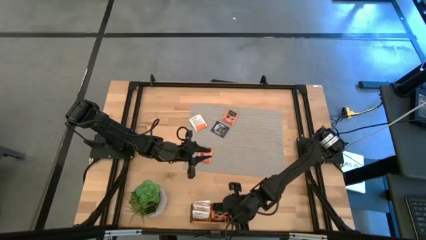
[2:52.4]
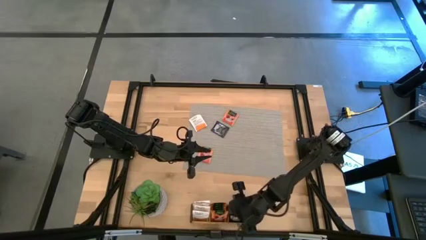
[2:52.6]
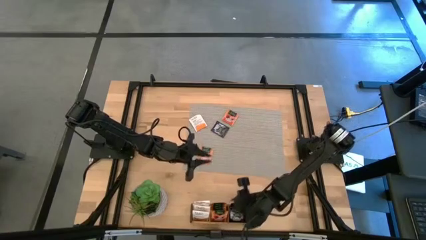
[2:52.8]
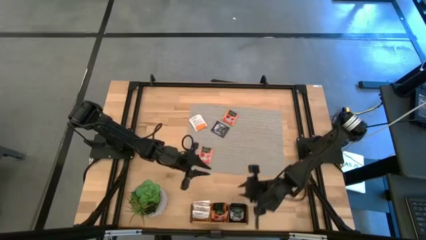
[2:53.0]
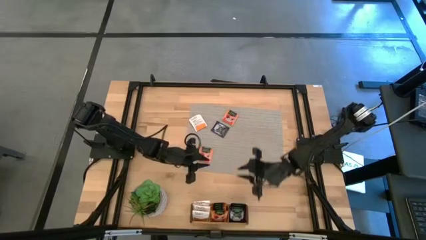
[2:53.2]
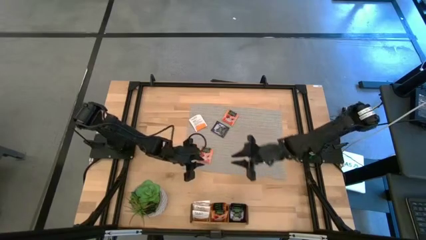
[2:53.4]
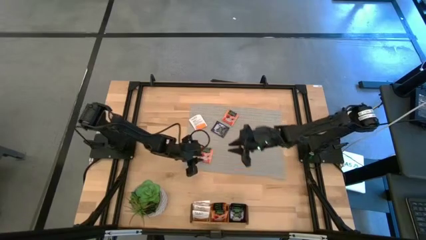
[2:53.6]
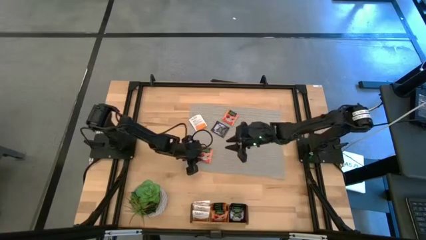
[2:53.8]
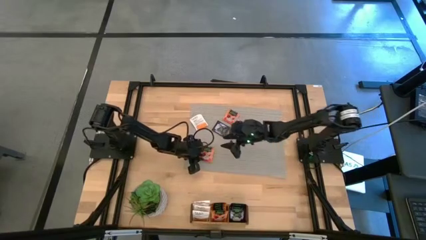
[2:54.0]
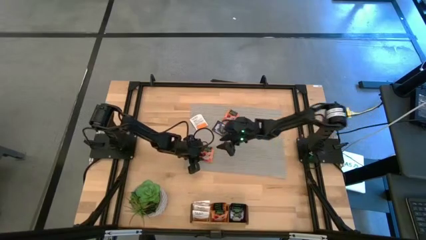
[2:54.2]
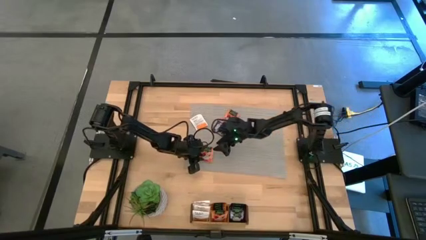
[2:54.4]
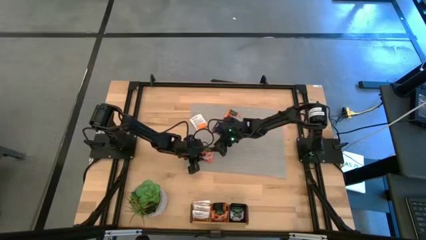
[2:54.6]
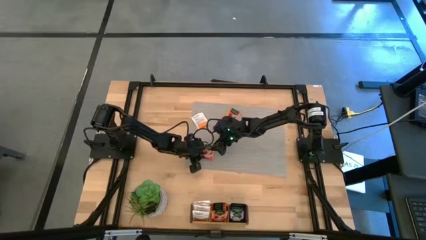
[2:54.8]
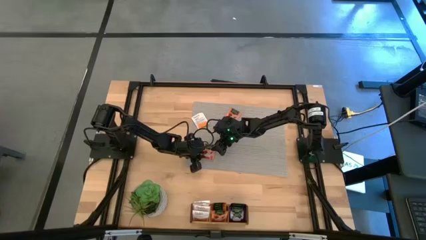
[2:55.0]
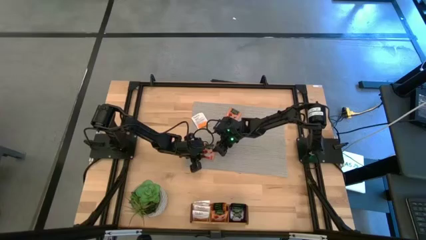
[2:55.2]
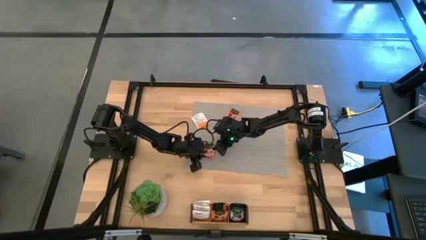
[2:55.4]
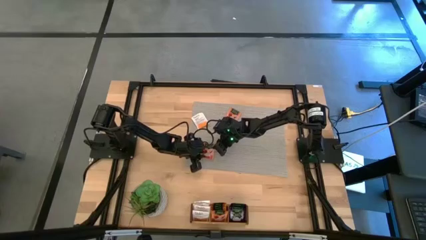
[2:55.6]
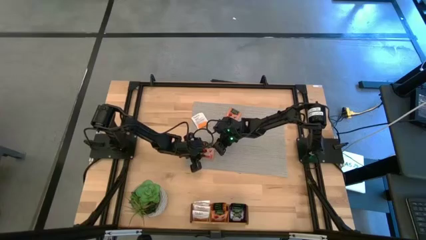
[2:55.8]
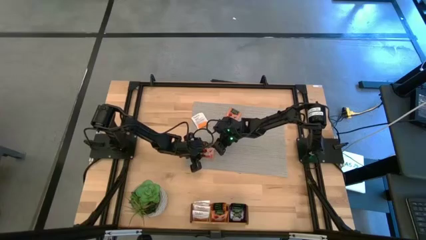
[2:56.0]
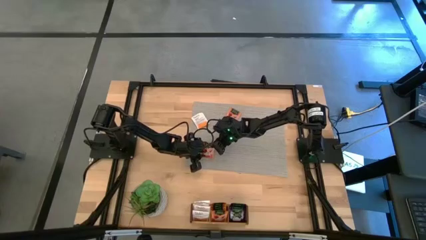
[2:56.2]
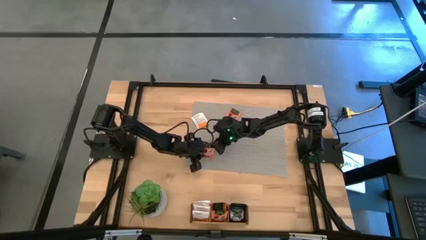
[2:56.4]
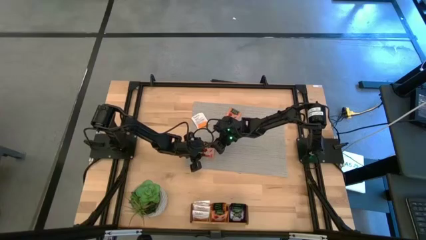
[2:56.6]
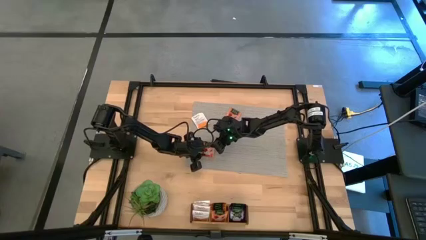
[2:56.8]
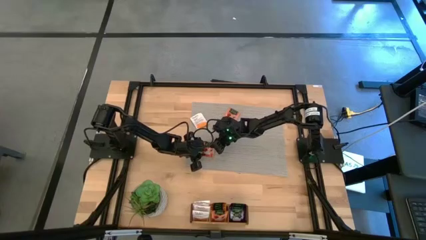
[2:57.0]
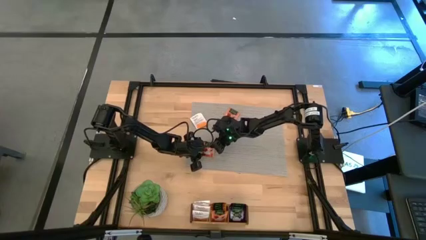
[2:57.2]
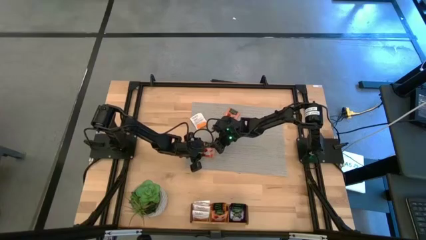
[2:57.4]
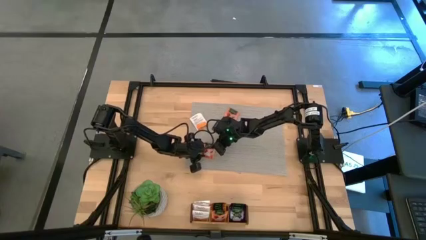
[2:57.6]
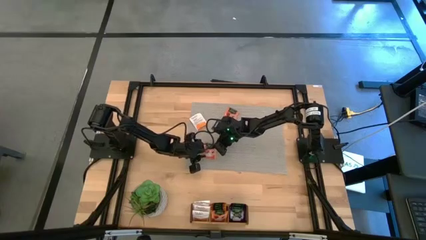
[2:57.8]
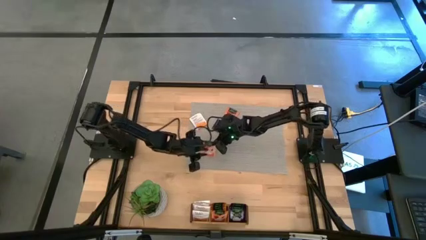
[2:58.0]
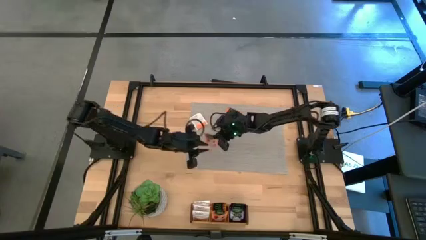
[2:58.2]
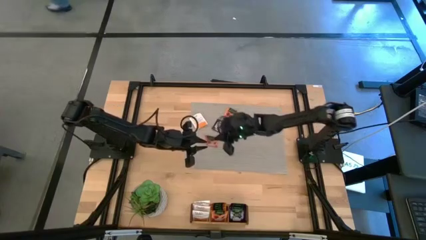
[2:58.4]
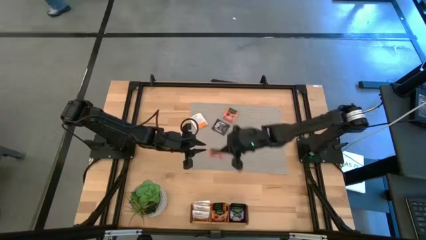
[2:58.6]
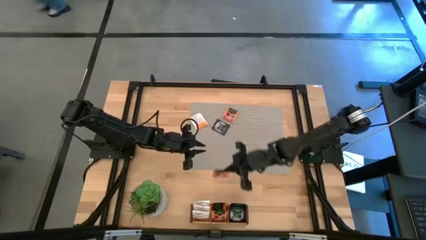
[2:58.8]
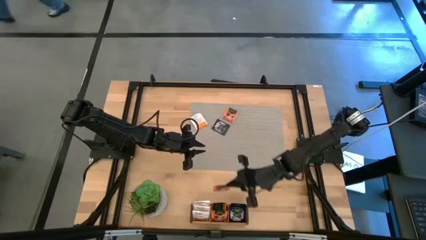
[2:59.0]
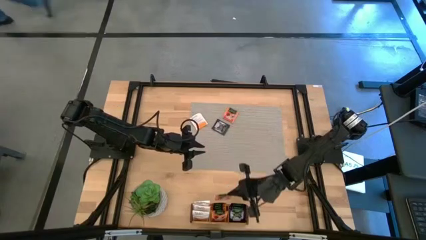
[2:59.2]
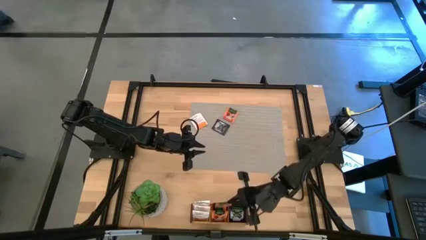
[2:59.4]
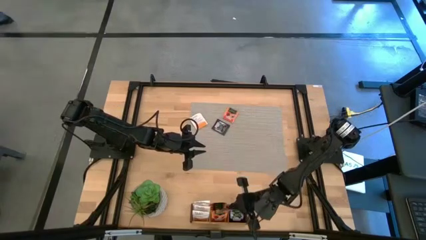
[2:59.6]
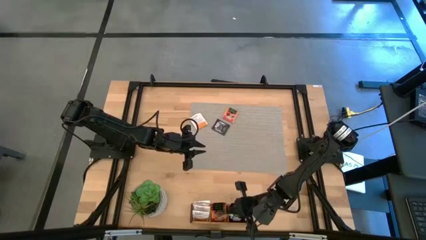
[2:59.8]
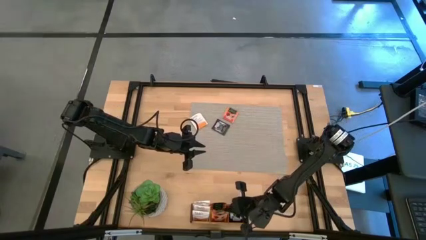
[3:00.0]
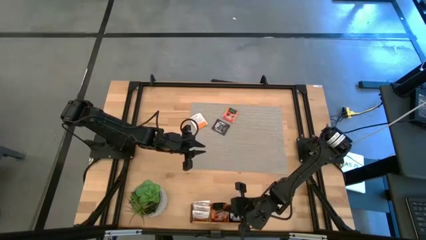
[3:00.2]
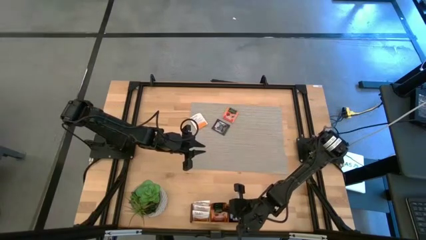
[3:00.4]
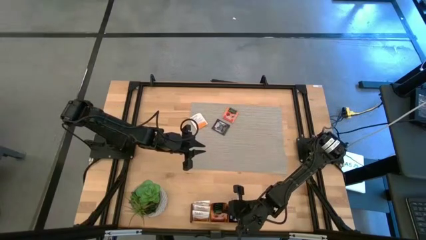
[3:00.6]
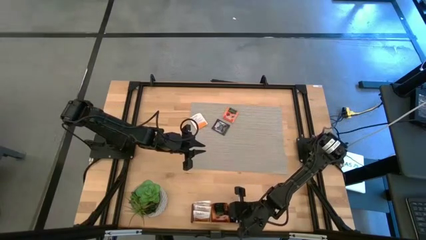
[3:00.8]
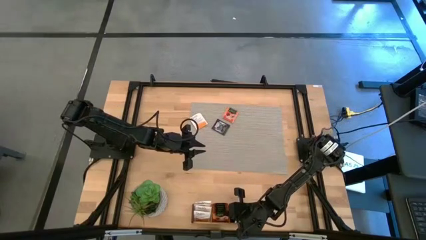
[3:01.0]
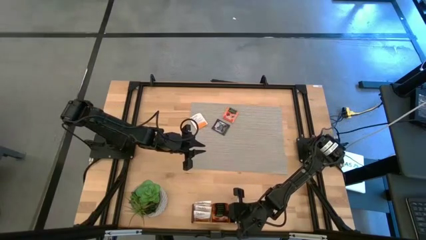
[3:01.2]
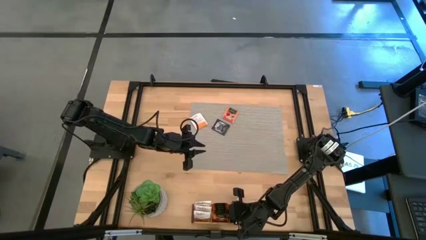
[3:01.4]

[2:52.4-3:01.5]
Task: Pick & Place Tea
Put the orange tea bag into the middle section of the wooden organizer

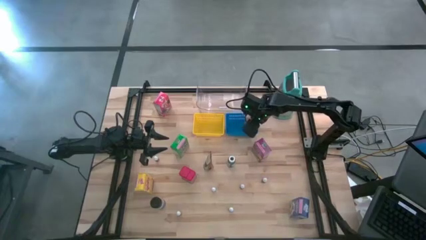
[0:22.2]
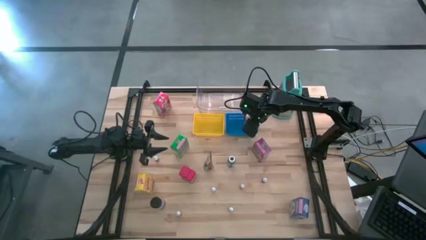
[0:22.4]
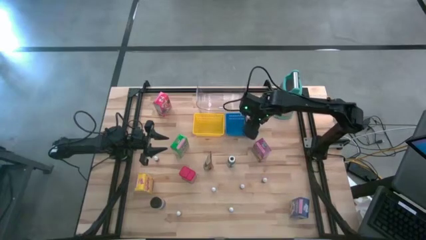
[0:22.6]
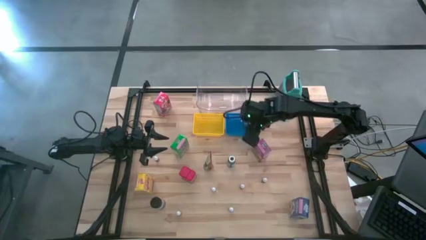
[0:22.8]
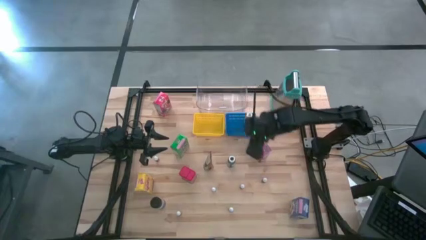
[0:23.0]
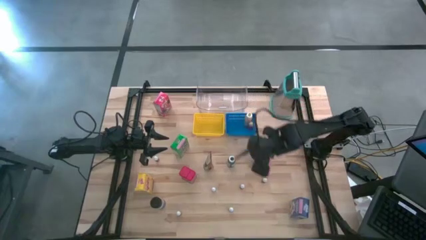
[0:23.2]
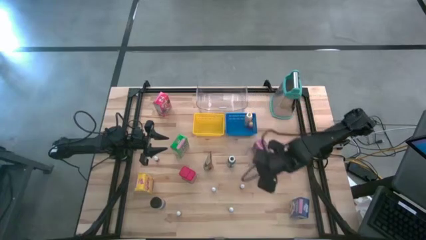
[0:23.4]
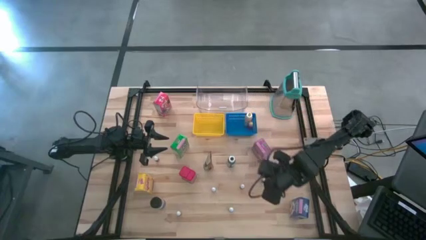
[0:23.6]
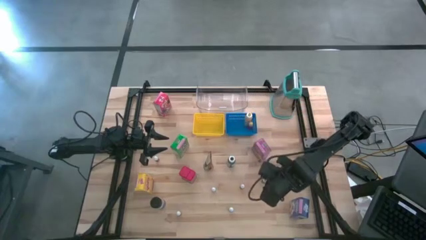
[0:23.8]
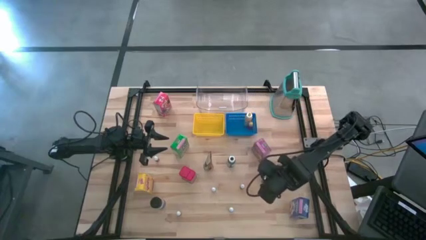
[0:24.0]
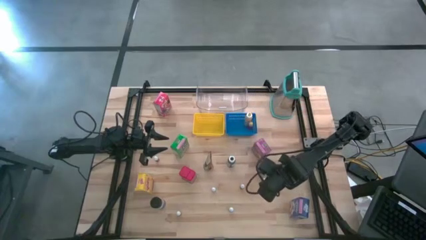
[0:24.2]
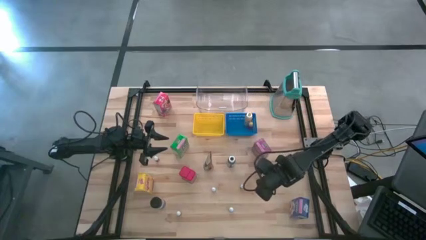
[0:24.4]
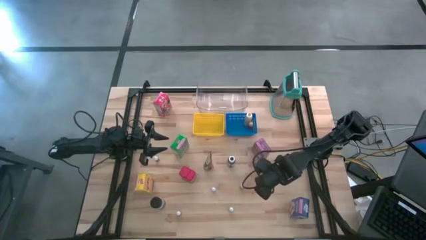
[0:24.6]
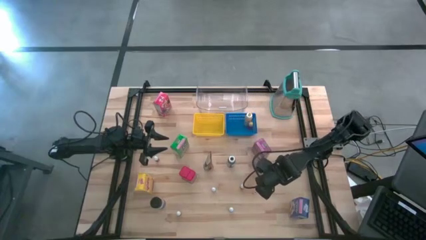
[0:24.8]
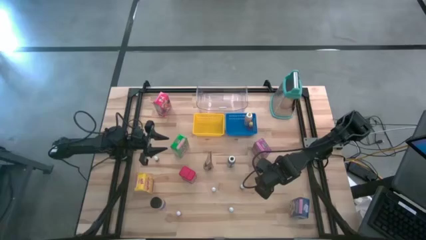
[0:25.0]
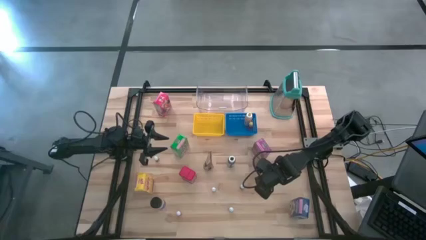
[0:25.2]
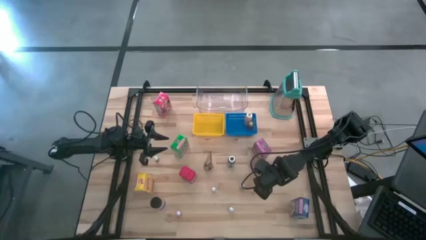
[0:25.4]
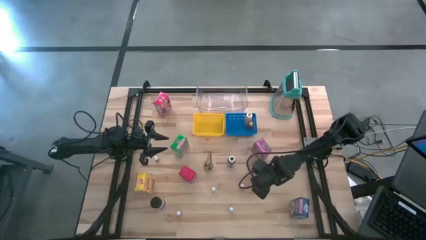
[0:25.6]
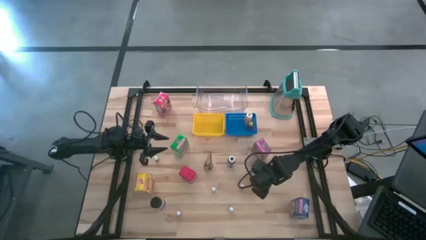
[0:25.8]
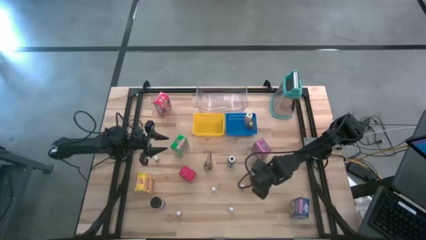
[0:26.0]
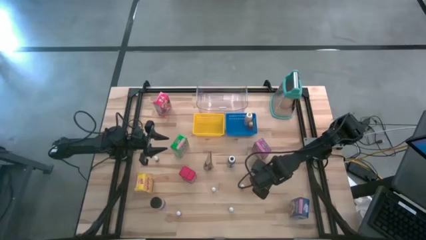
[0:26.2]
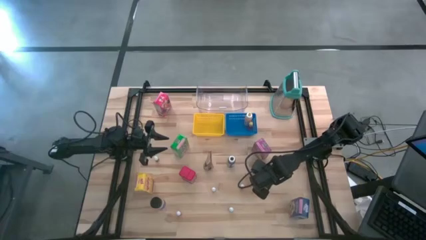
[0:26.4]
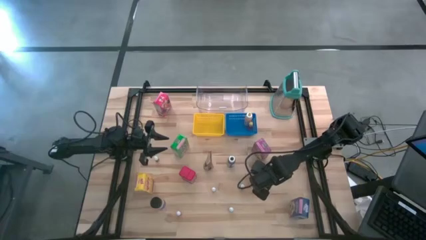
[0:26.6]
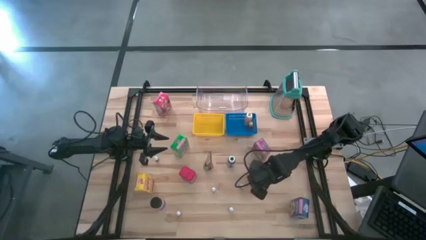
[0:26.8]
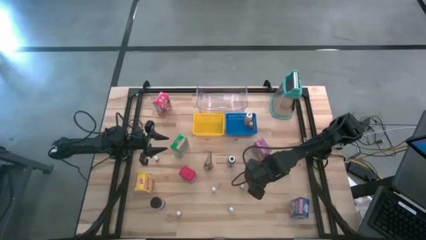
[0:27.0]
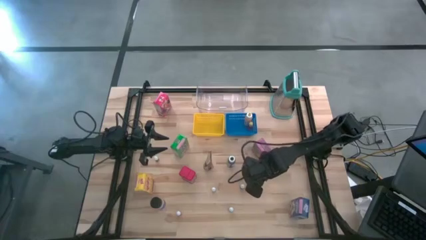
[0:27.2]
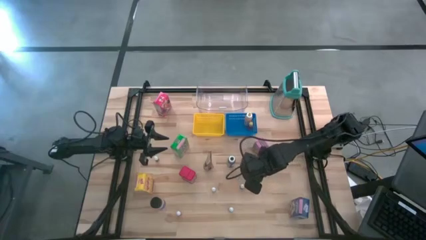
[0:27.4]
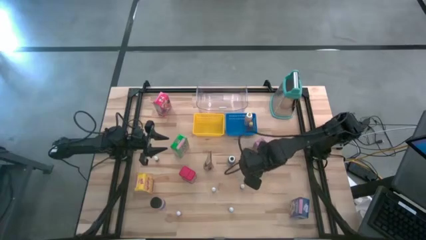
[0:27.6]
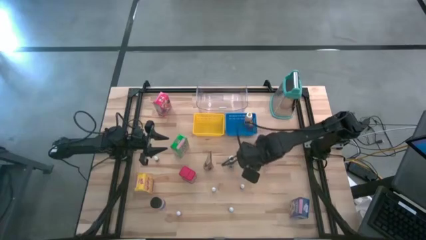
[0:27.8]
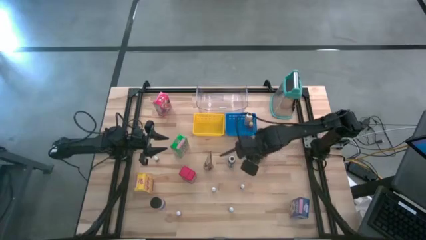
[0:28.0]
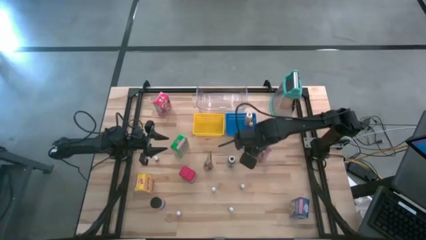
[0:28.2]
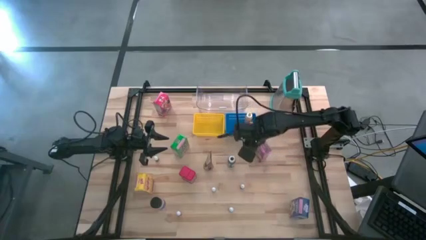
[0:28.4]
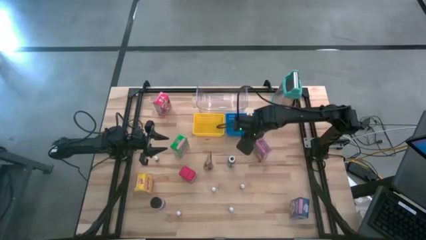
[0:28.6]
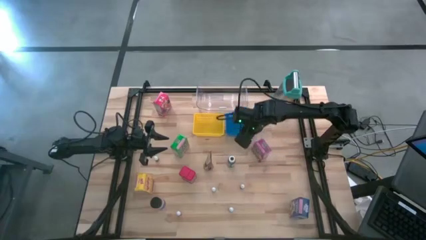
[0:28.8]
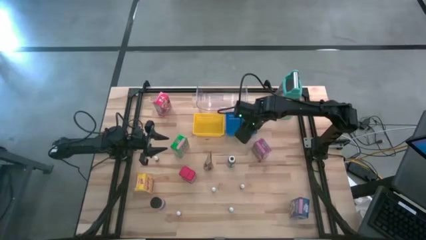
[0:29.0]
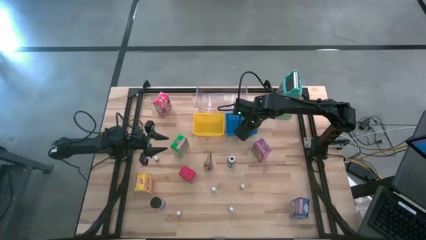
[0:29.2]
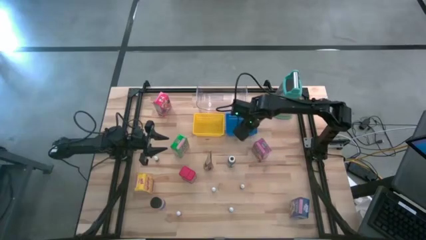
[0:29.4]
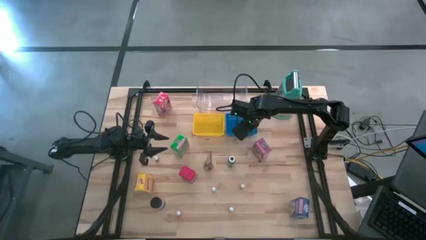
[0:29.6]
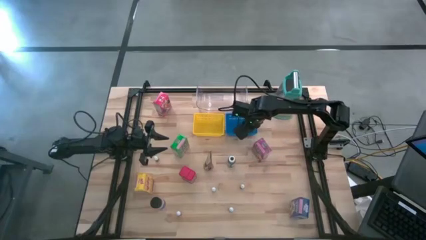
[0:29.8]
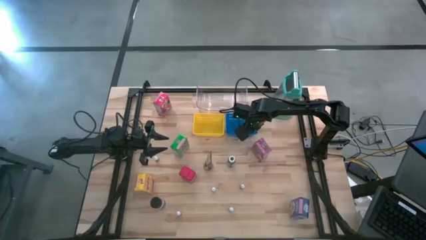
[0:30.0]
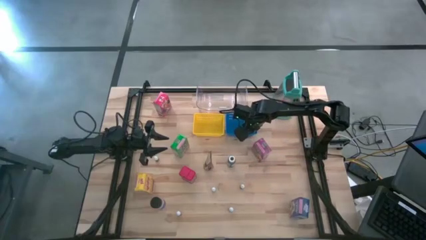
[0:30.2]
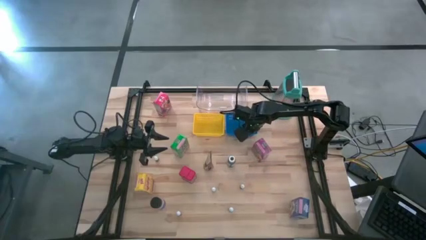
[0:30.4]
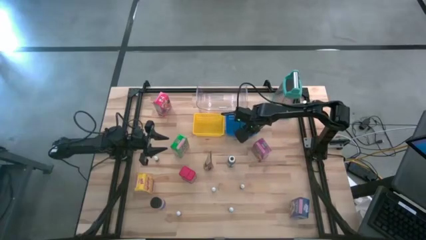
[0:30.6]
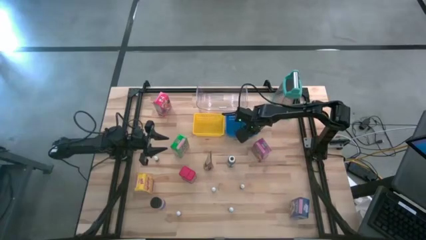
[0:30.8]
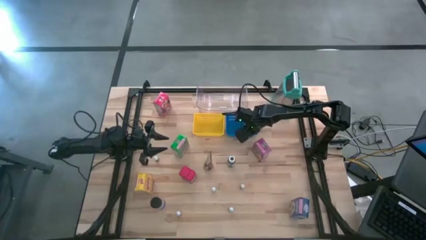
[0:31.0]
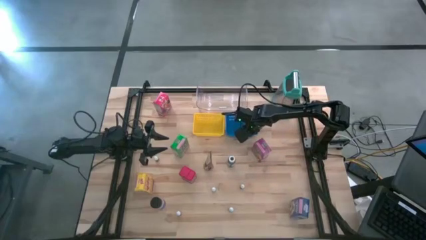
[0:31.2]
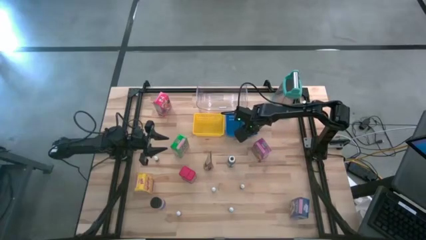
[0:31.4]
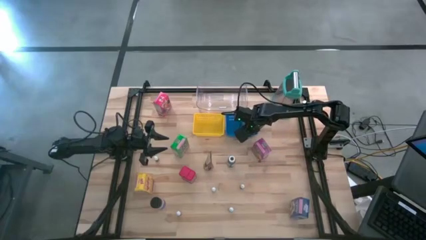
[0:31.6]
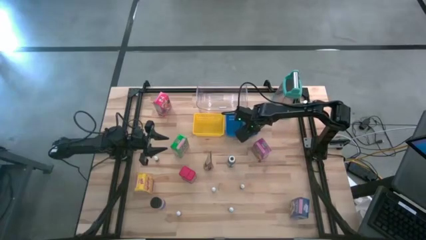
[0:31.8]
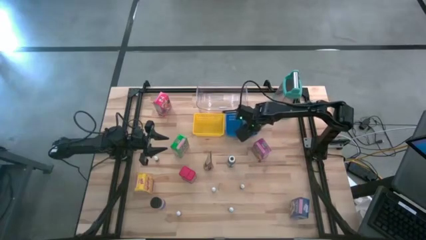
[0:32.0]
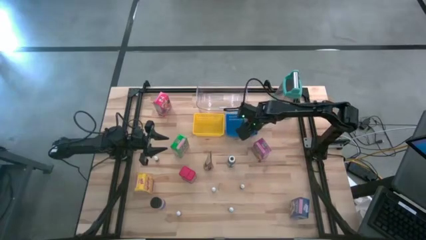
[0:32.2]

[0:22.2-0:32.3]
Task: Pick & Place Kitchen Items
Put the green food coloring bottle into the blue bin
